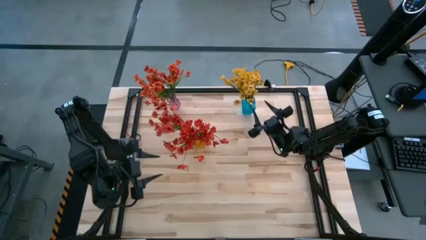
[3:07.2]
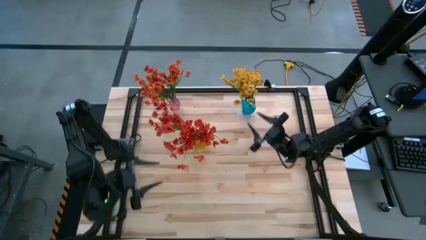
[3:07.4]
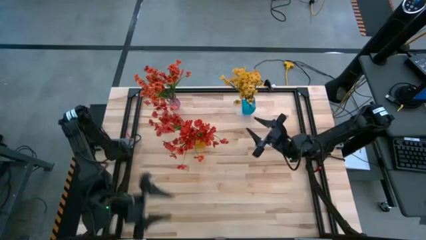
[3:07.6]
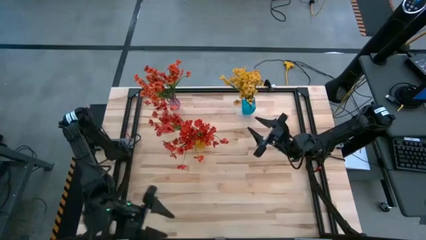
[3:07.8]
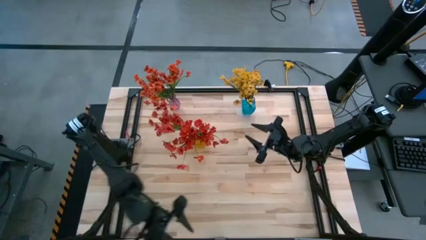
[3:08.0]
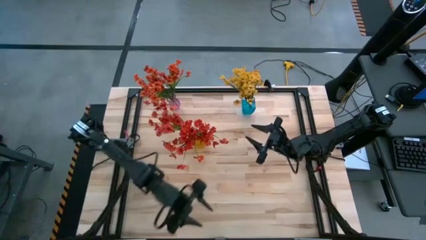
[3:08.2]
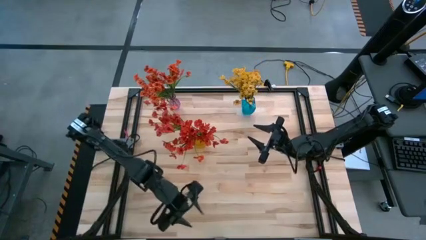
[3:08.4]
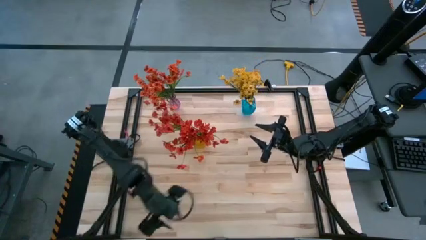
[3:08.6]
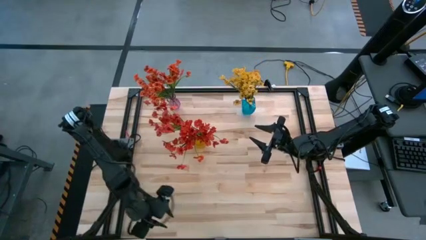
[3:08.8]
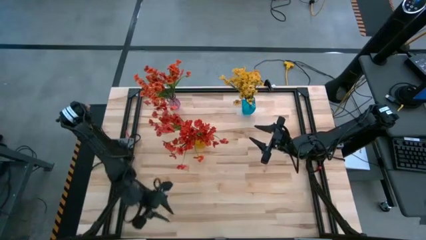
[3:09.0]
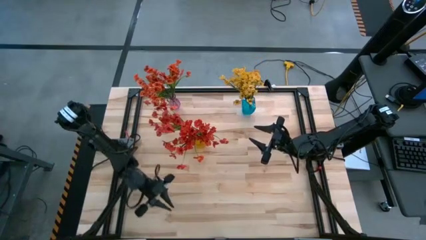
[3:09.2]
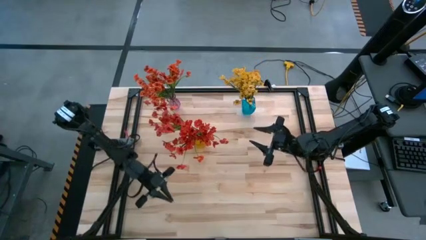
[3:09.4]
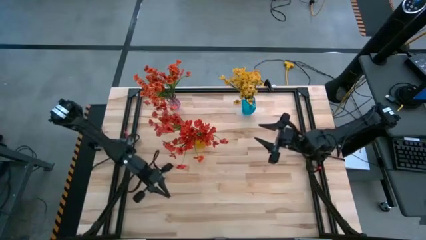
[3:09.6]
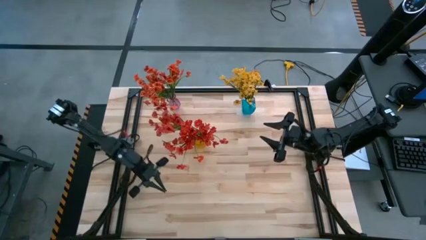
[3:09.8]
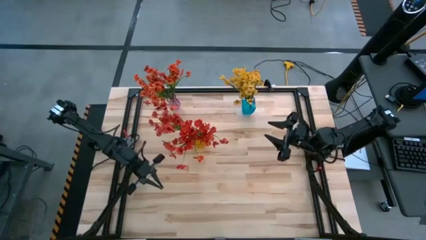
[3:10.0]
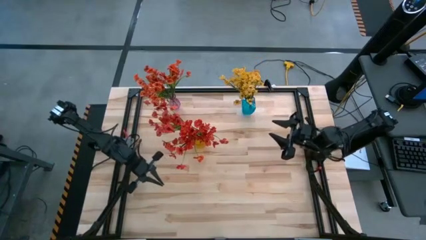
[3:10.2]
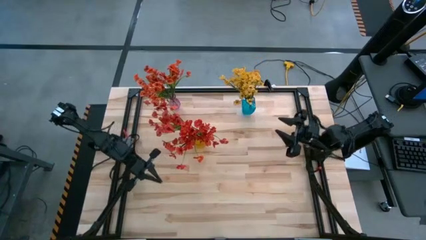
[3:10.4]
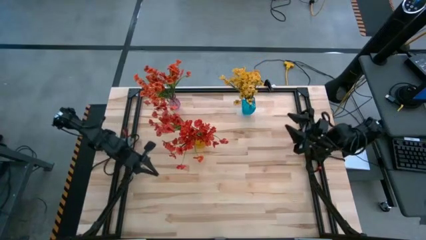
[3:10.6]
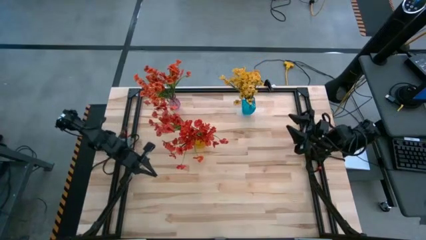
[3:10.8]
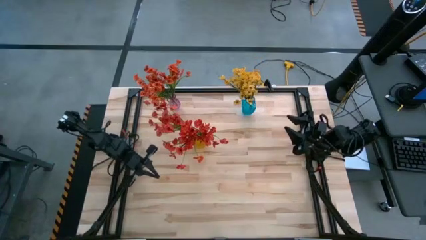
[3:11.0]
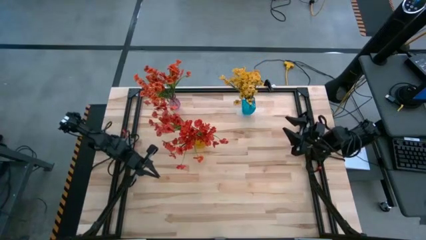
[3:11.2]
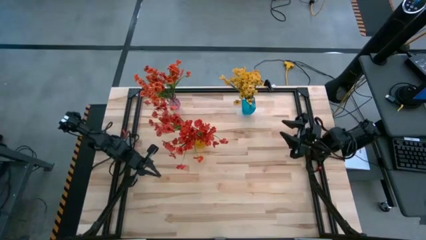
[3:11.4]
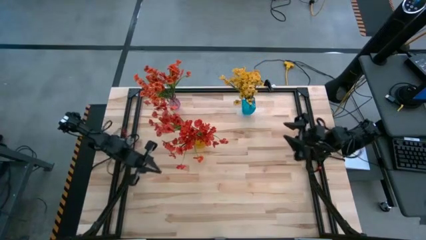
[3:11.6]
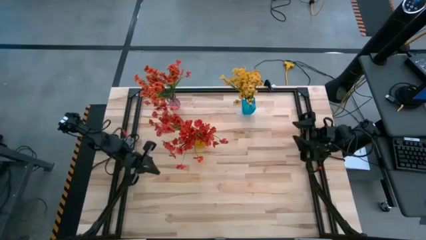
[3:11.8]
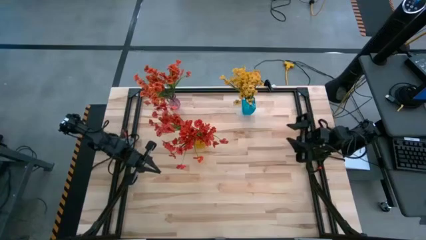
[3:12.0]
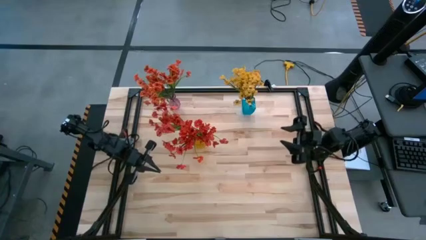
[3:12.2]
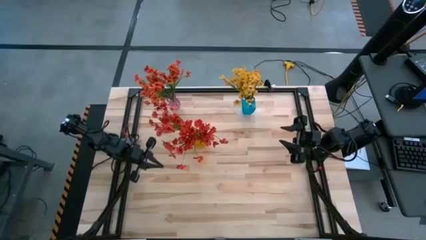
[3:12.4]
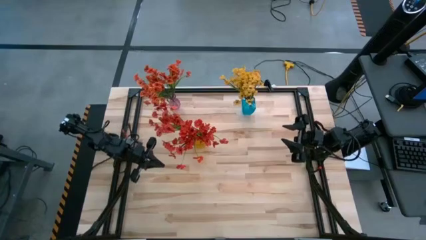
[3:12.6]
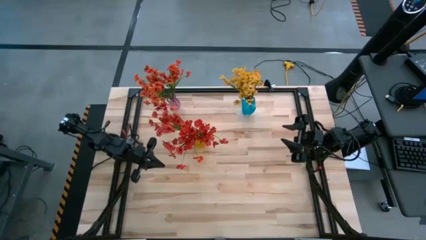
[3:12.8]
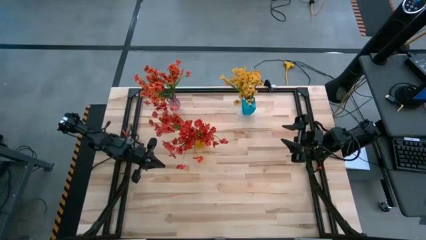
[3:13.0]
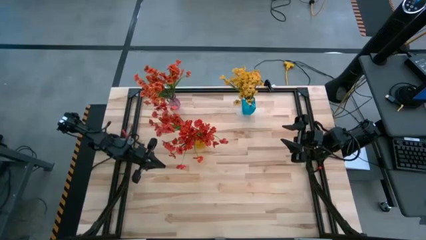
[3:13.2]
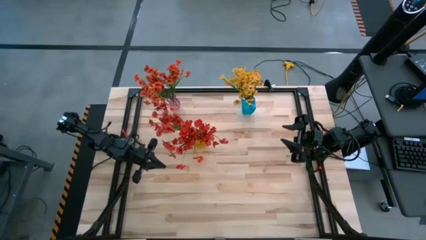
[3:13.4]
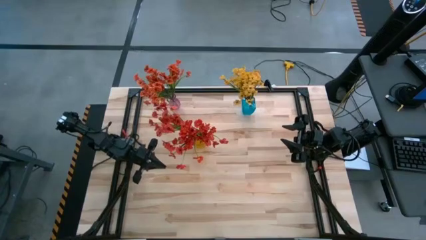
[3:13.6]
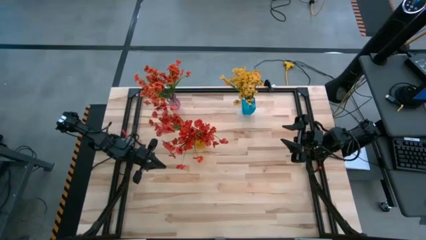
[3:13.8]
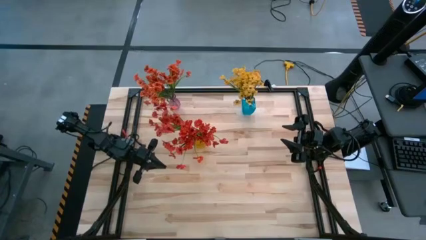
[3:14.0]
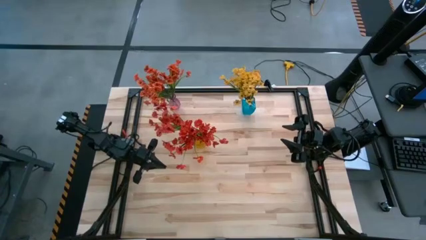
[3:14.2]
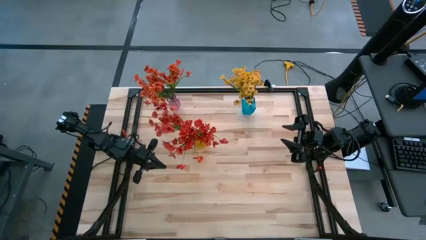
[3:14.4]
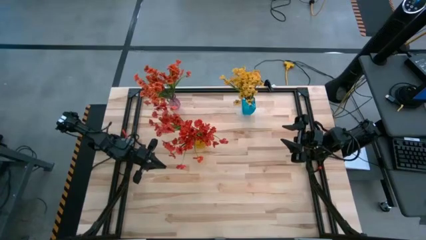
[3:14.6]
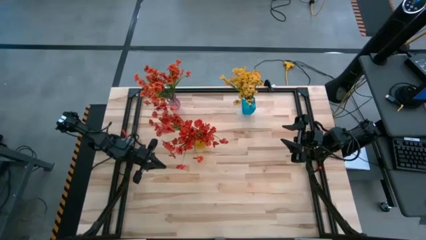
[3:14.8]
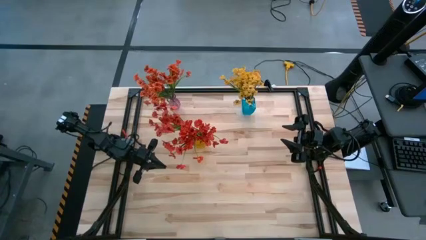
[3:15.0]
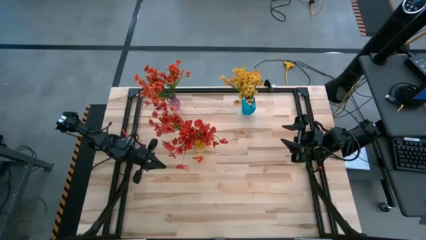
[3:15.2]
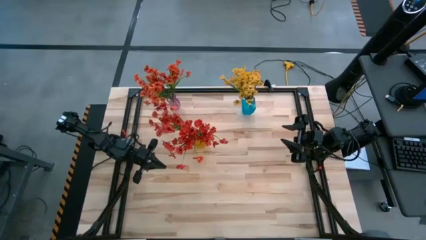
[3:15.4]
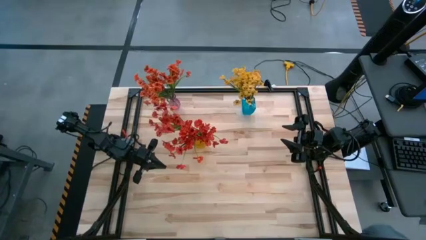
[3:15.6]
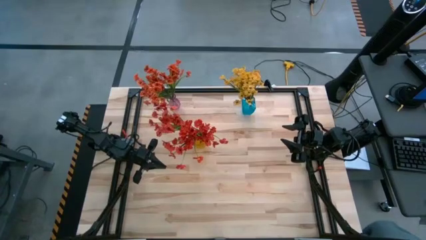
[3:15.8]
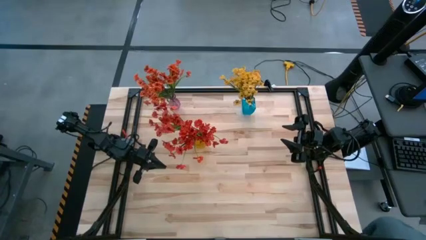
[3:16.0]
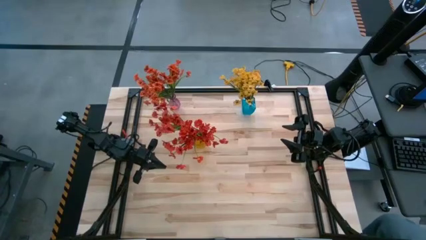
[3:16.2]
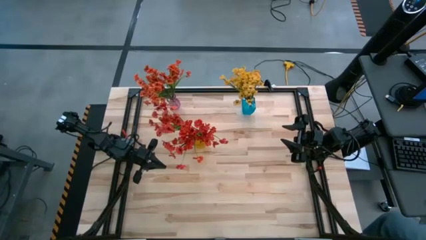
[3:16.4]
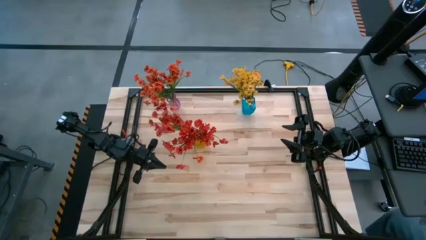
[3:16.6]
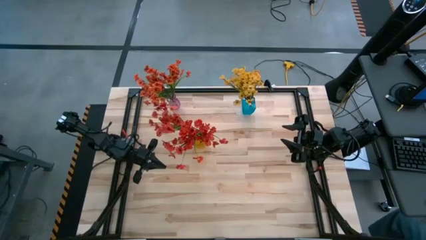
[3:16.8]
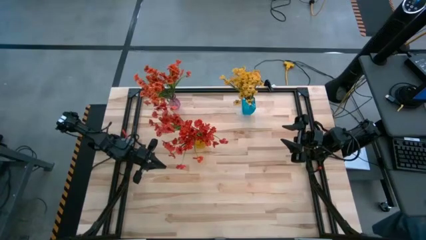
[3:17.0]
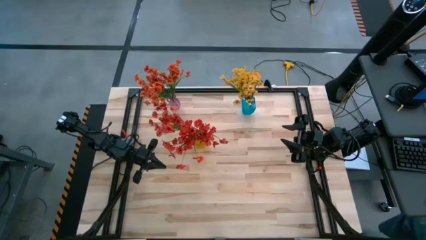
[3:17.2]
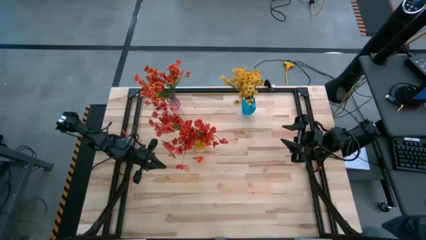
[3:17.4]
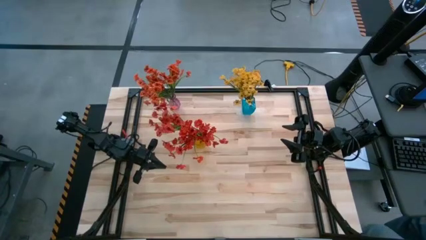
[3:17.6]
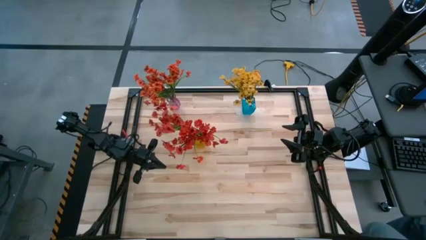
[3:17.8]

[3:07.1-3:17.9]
Task: Sort flowers into vase by color
Return to Home Position

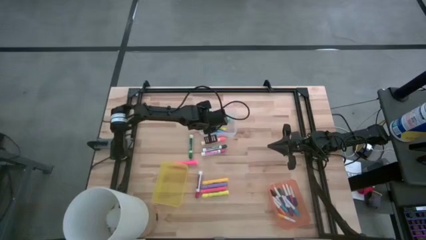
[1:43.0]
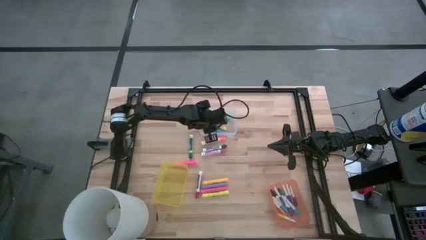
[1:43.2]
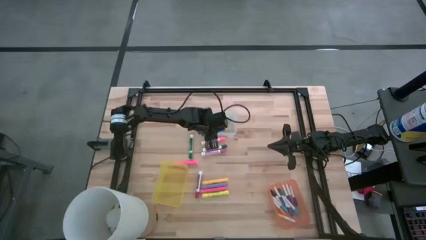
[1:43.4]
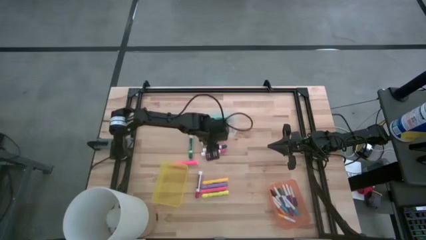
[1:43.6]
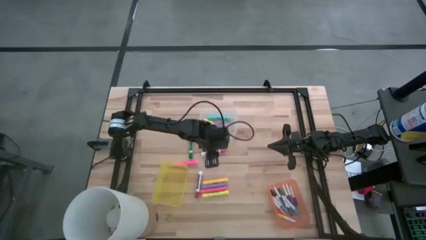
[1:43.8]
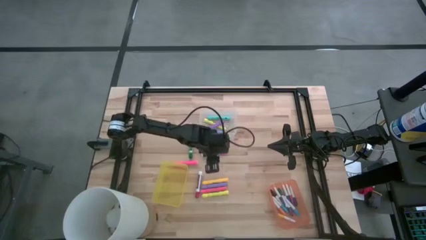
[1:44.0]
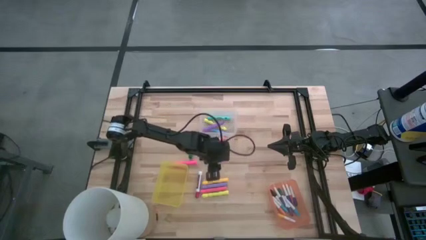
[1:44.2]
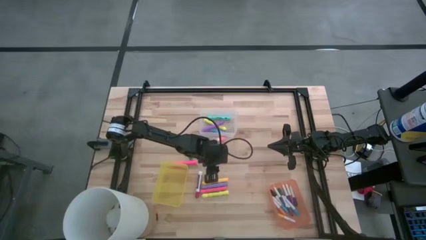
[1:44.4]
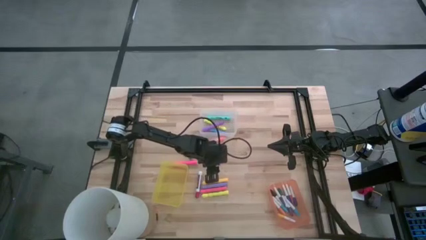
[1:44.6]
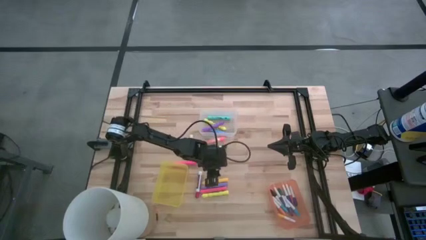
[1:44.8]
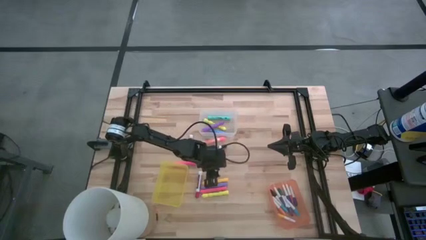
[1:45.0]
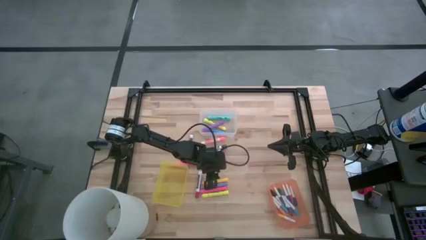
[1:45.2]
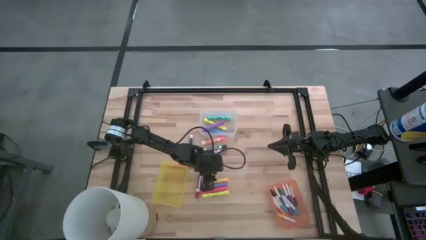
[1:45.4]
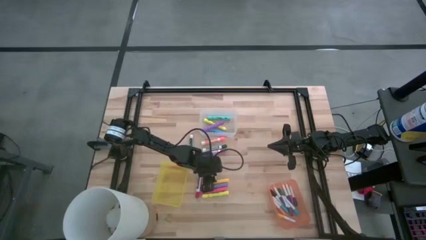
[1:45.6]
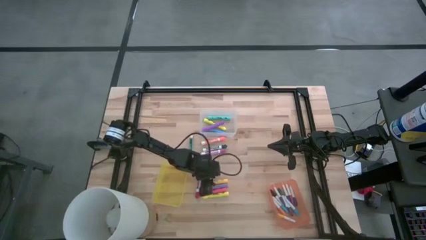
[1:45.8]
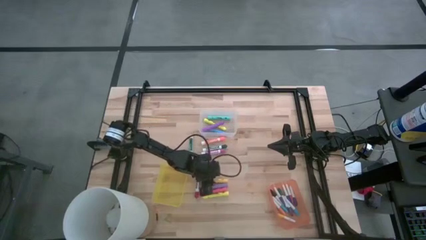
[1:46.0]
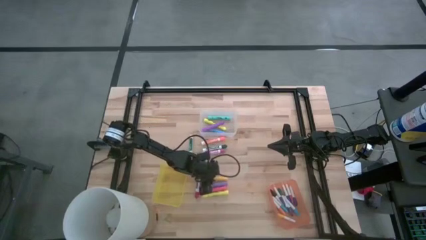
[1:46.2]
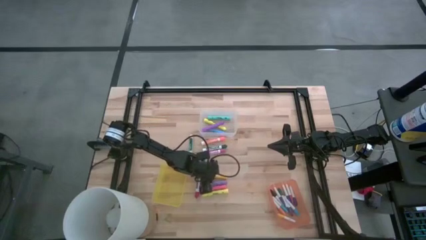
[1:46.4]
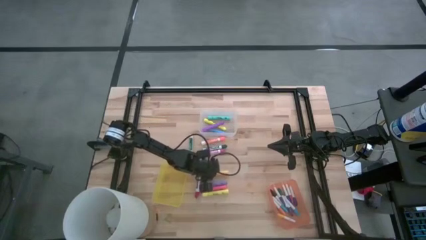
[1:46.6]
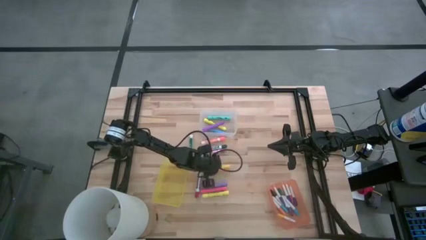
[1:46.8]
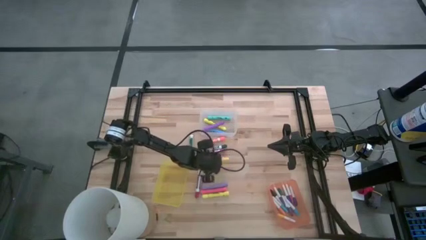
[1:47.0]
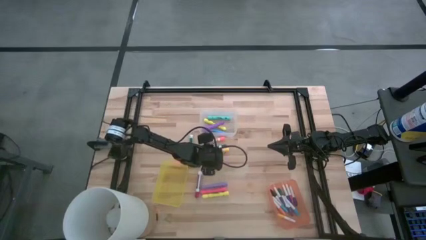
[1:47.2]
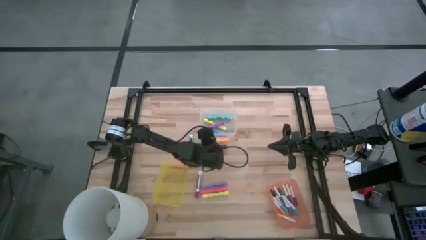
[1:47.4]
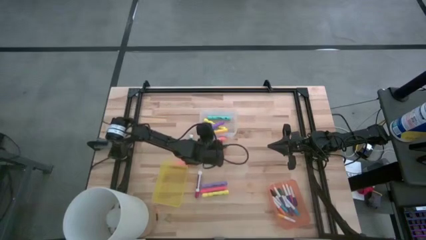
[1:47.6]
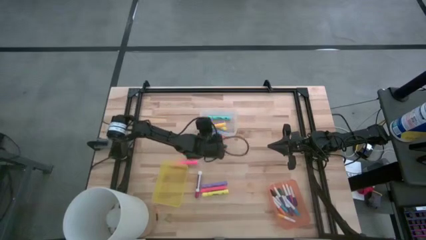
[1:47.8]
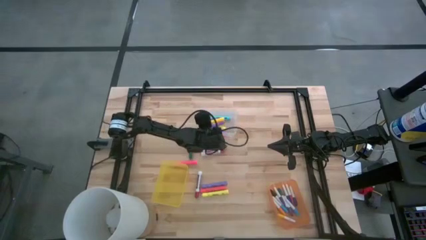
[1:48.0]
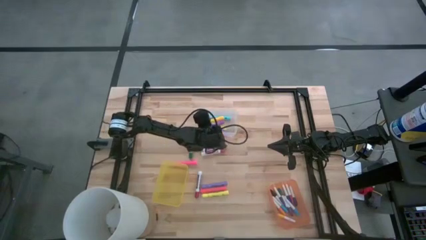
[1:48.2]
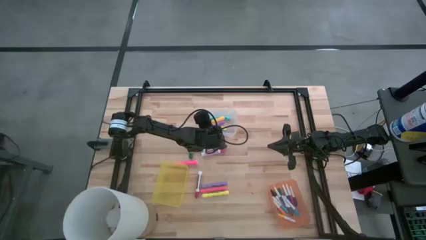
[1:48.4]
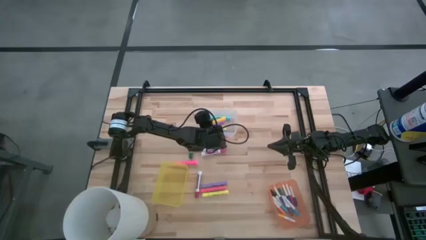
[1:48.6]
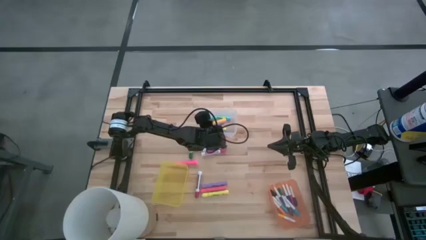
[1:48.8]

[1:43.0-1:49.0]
Task: Pick & Place Markers
Put the large orange highlighter pen into the transparent bin
